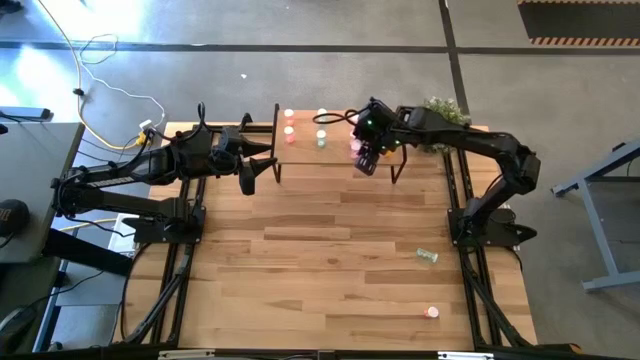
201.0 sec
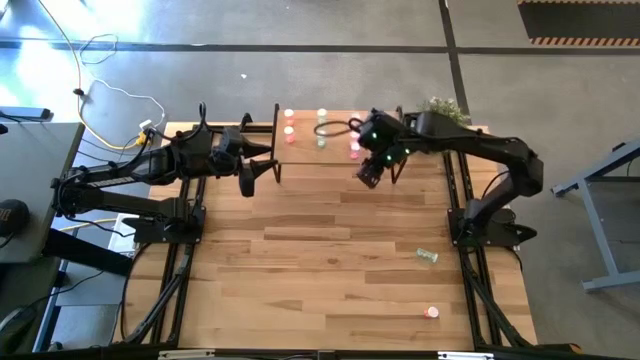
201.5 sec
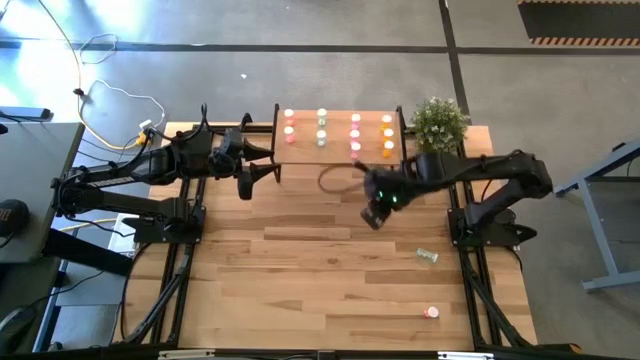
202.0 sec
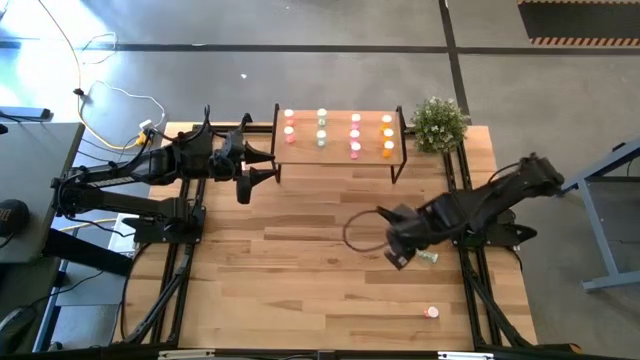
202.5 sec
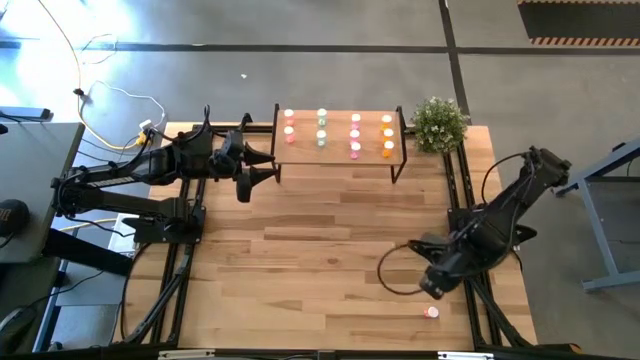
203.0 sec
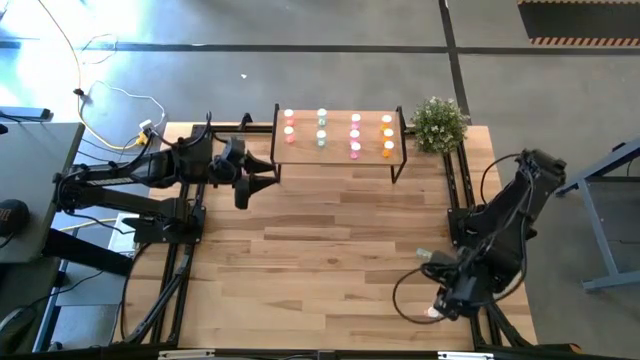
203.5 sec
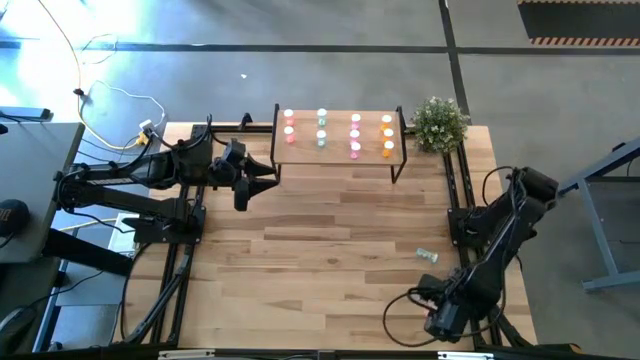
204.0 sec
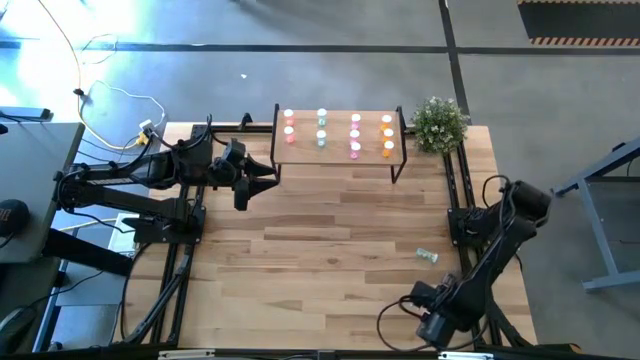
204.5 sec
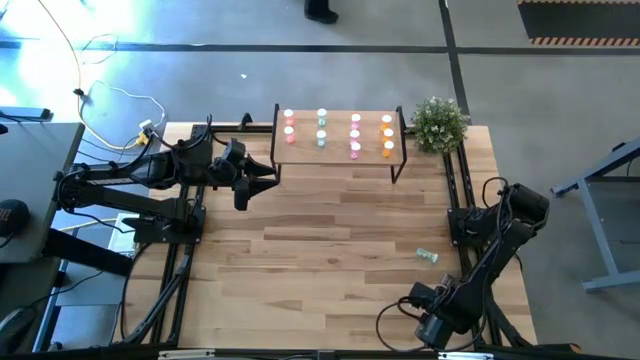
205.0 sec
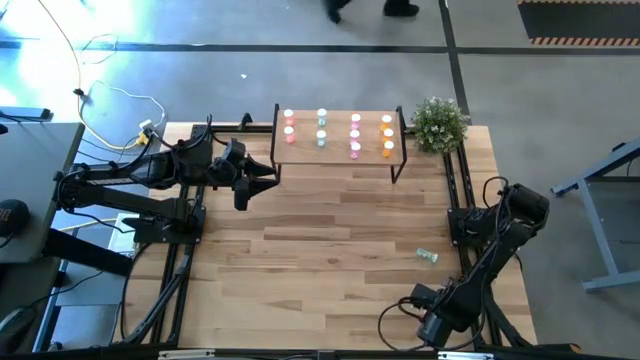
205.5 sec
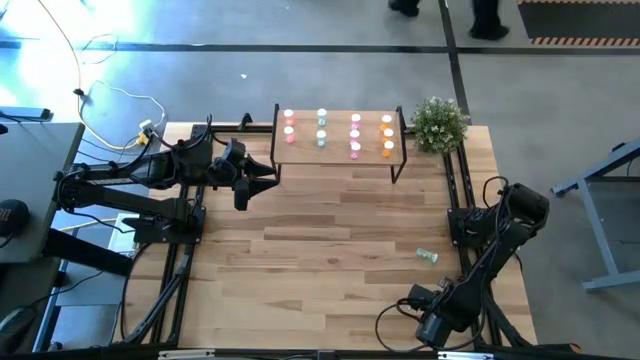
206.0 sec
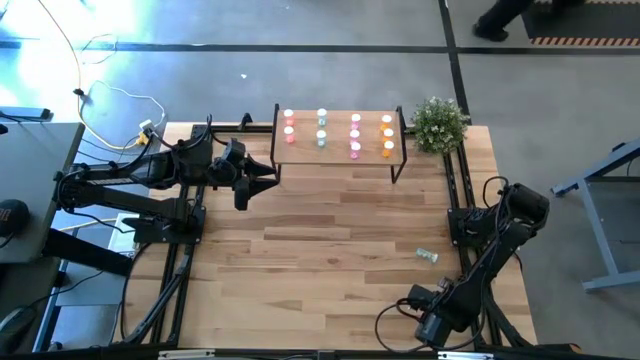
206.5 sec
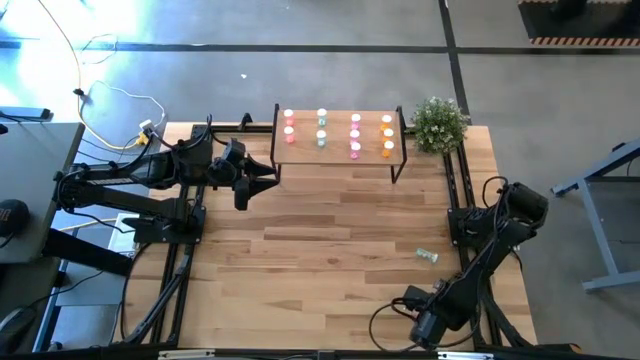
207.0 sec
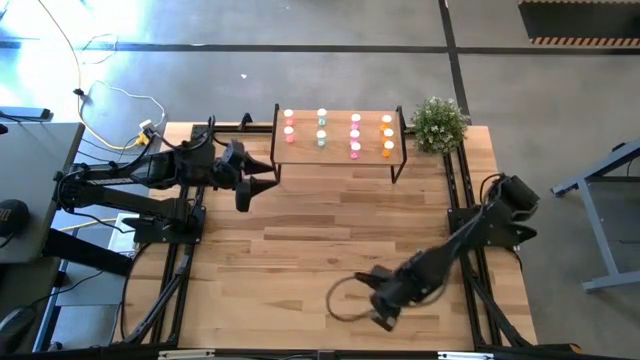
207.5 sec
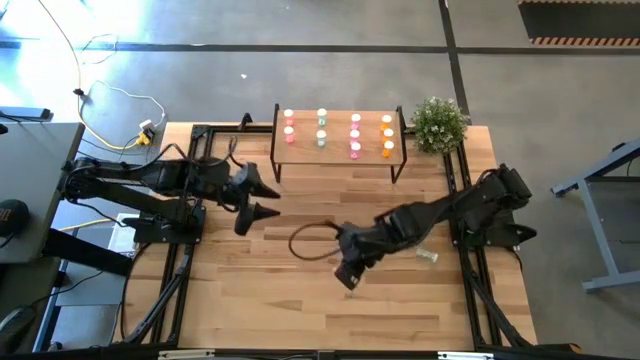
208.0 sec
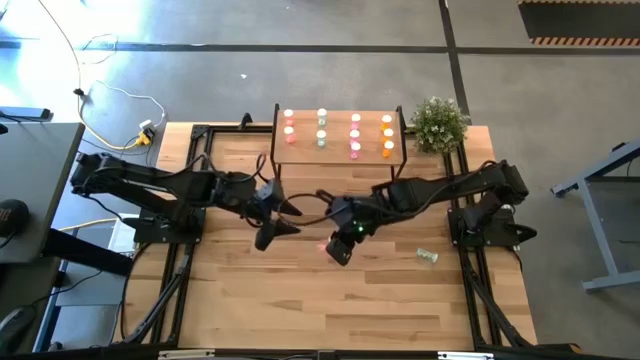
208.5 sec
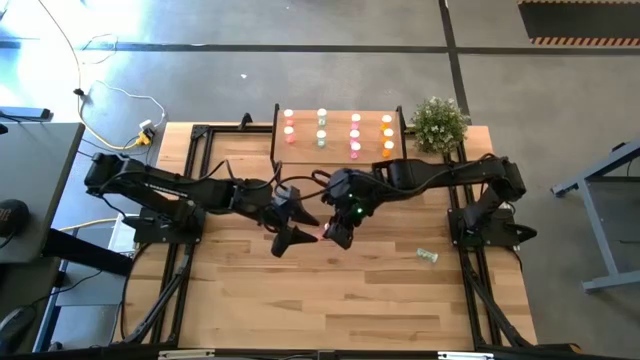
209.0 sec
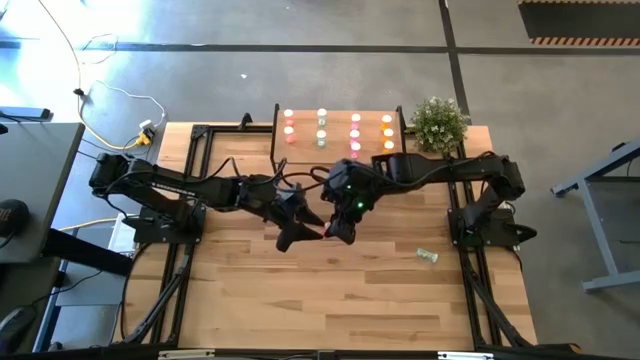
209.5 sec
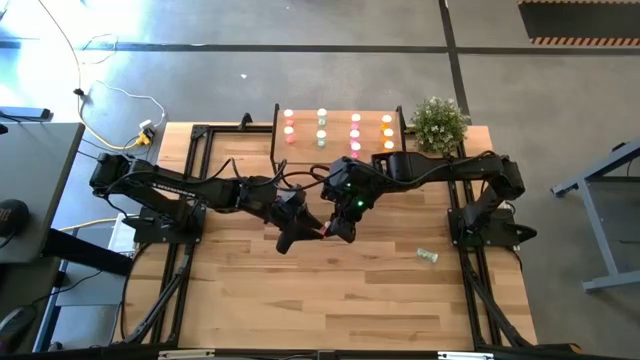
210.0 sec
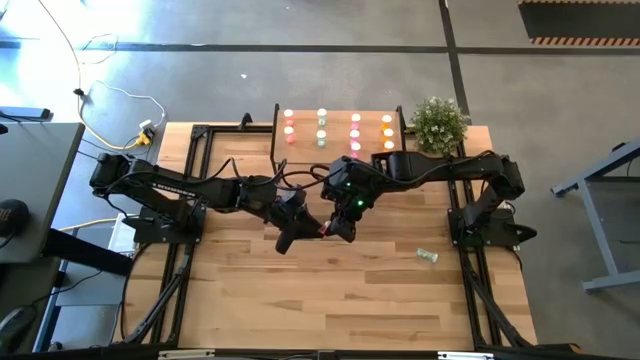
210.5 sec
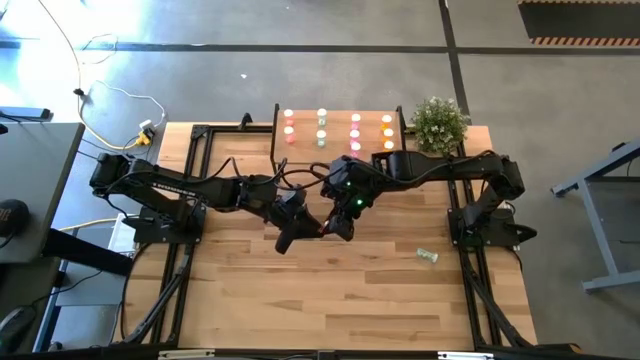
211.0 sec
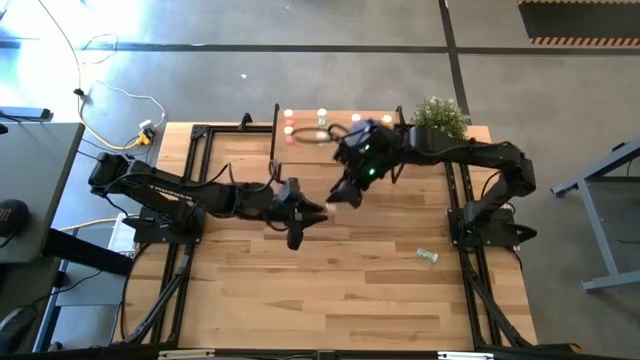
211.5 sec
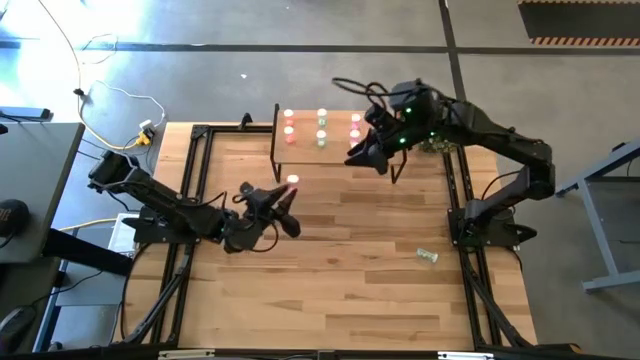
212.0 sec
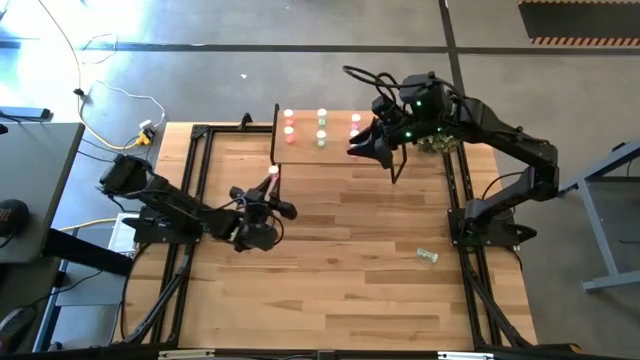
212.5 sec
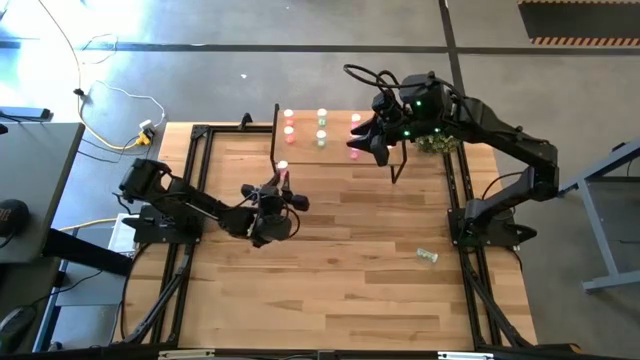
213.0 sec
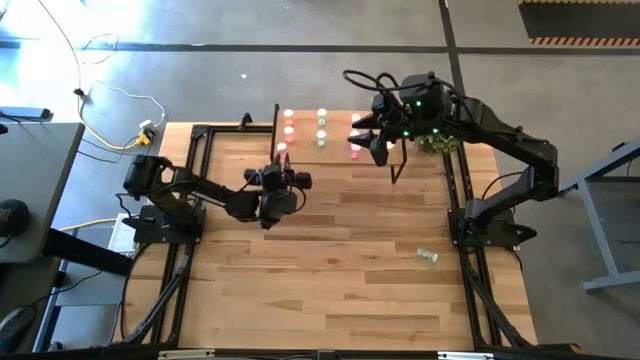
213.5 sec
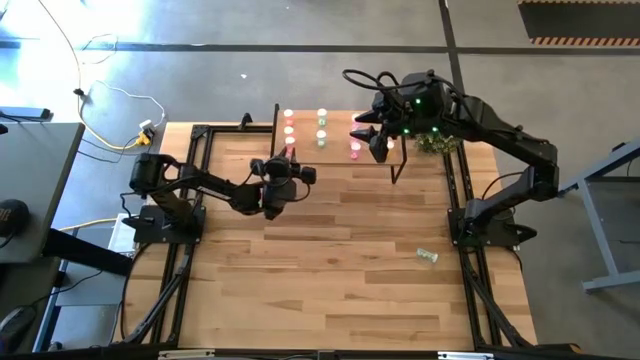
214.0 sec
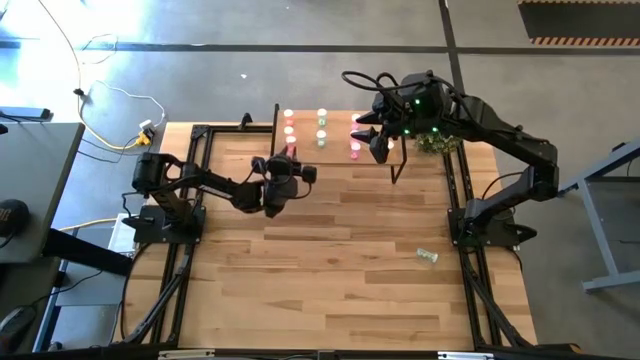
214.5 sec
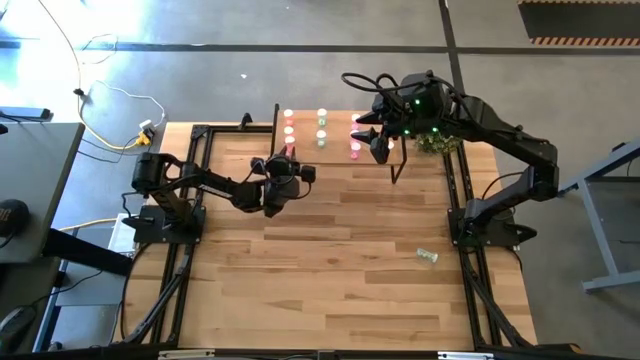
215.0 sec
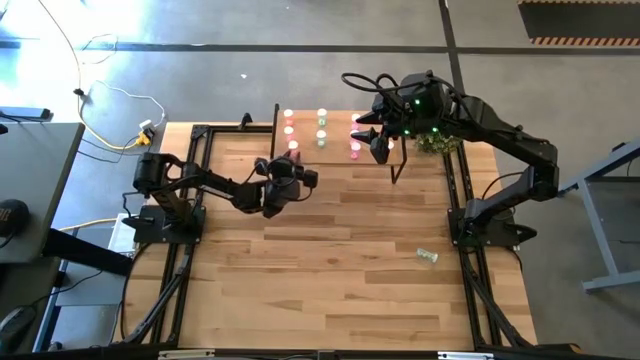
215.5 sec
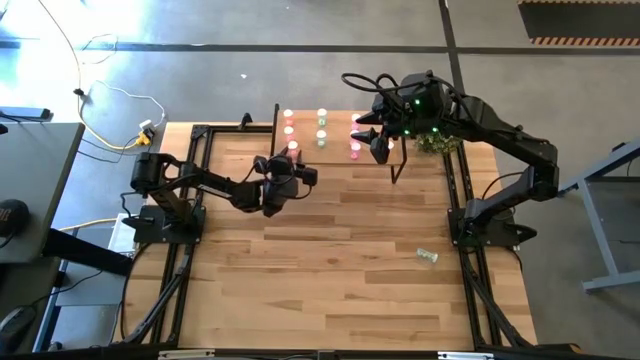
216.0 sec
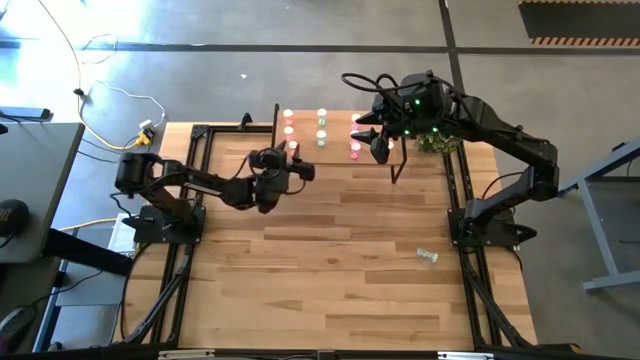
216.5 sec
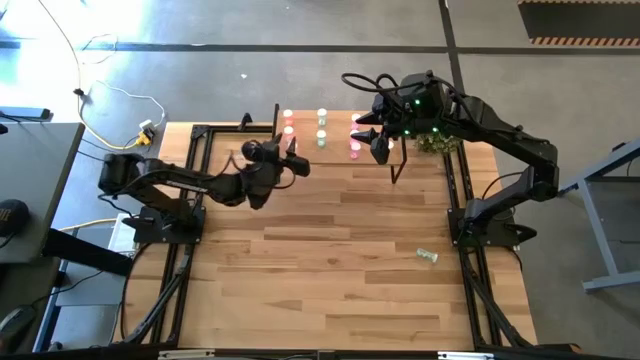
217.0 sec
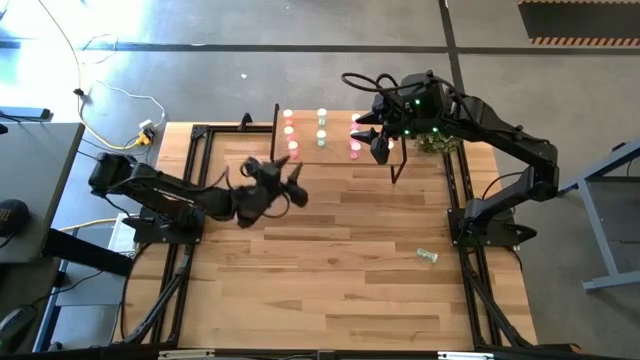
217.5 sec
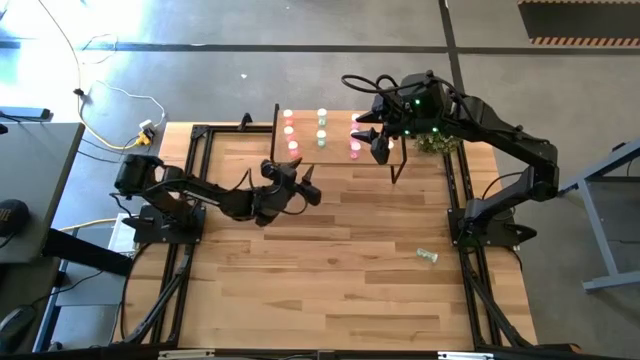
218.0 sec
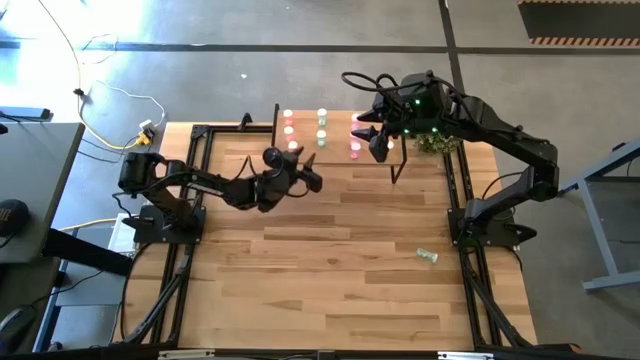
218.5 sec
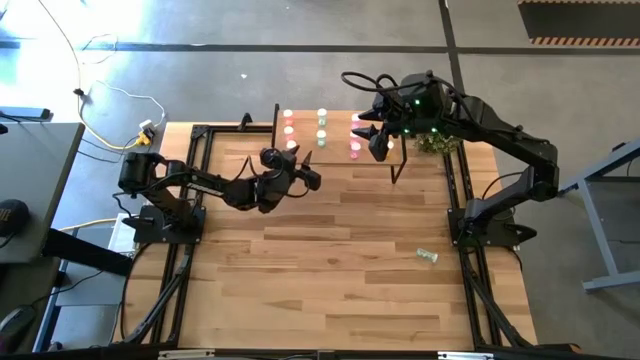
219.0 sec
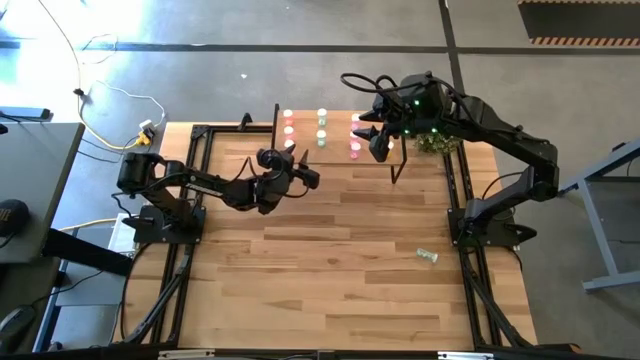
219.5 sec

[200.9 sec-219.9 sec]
Task: Pick and place medicine bottles onto shelf by color
Put the pink pill bottle on the shelf aligned with the other pink pill bottles

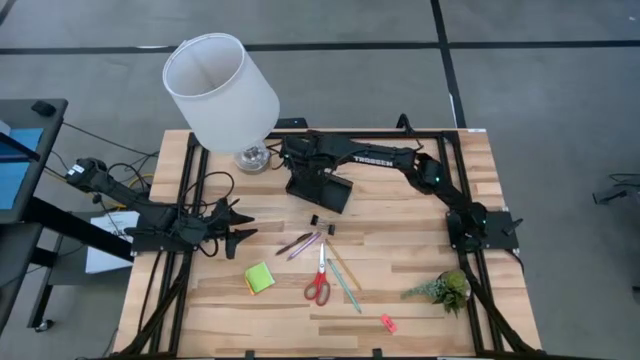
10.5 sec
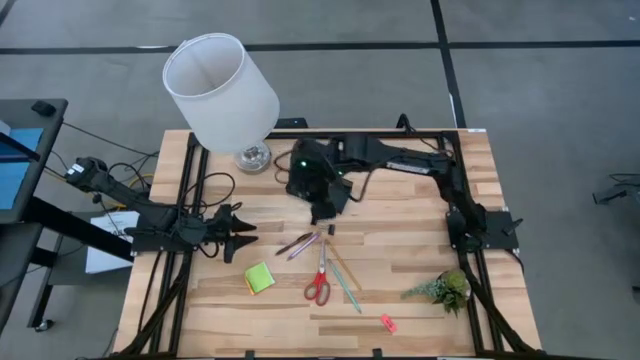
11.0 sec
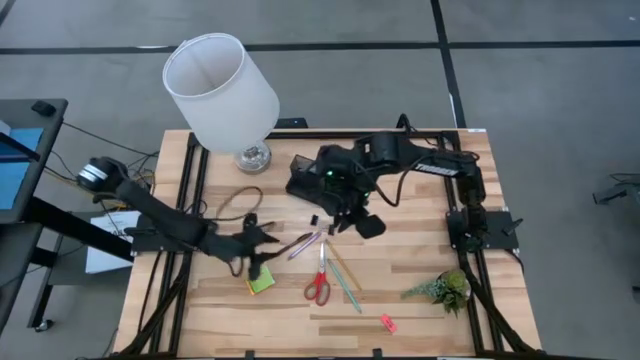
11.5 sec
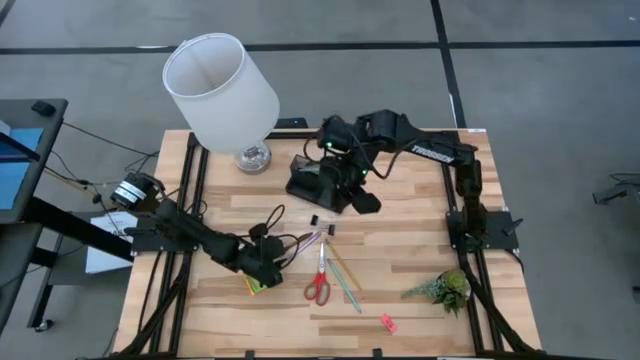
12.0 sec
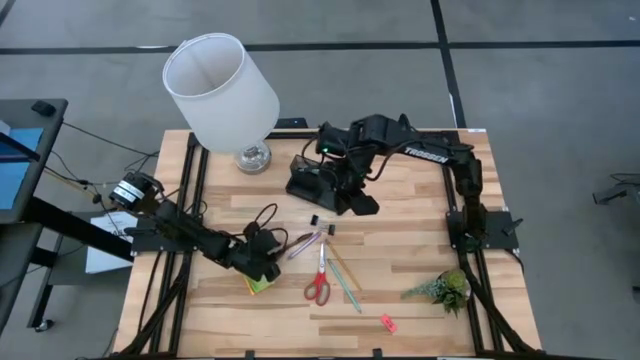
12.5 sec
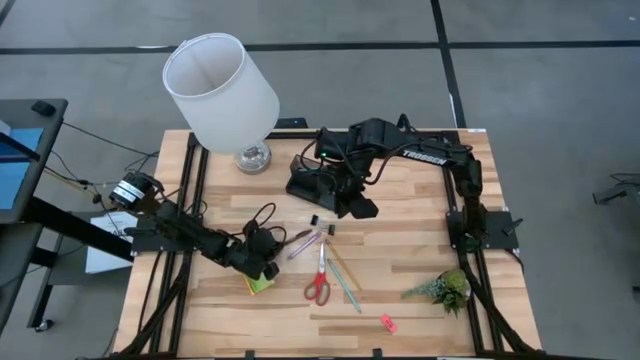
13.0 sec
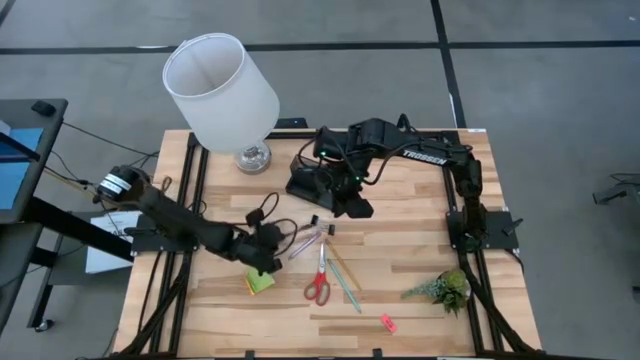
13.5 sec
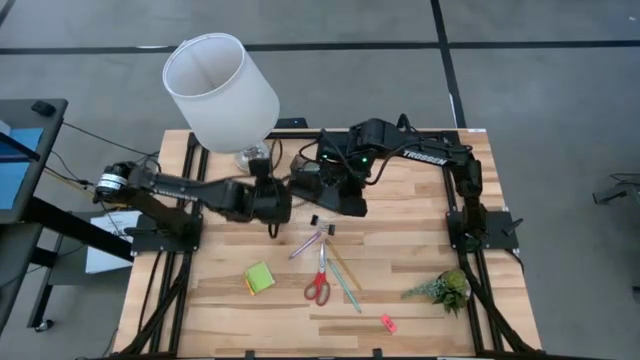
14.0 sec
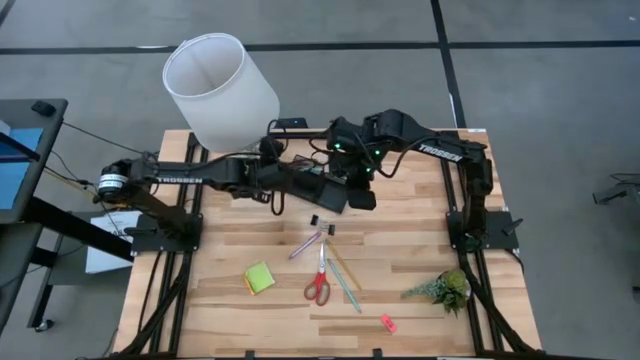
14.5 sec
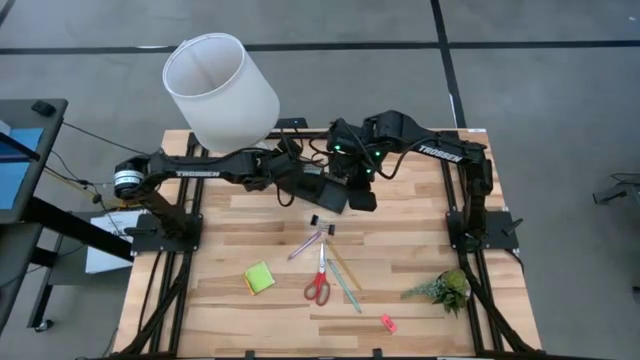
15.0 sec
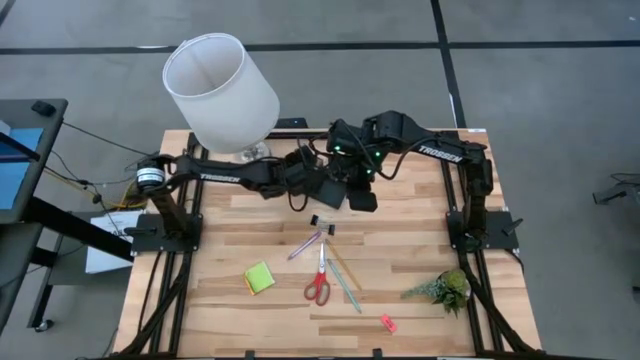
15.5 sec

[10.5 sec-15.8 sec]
Task: Pick and place office supplies into organizer
Put the brown pen into the black desk organizer
